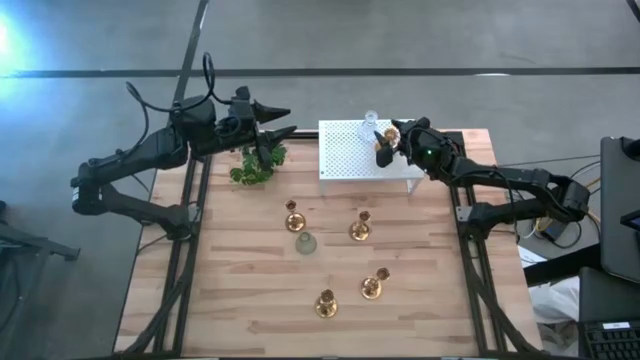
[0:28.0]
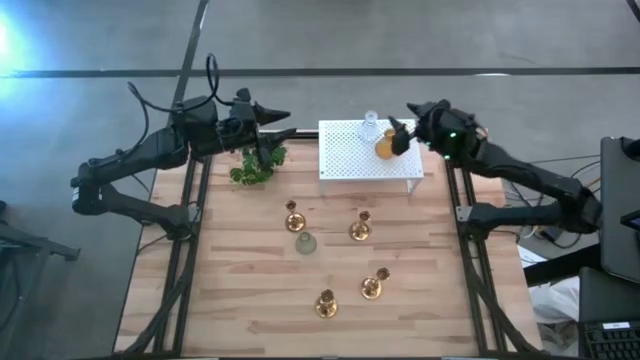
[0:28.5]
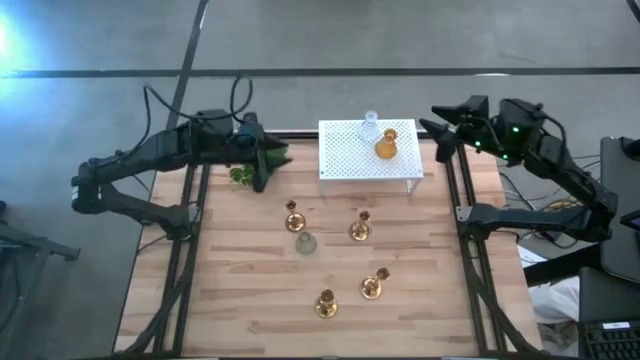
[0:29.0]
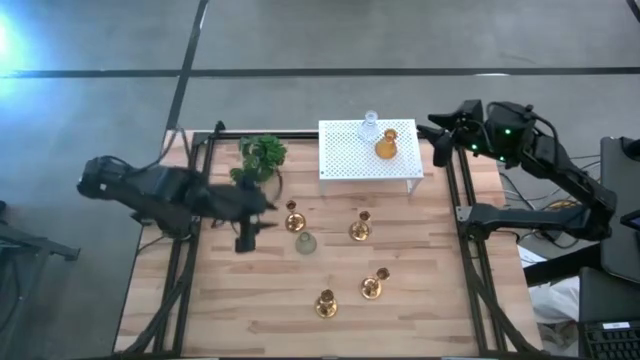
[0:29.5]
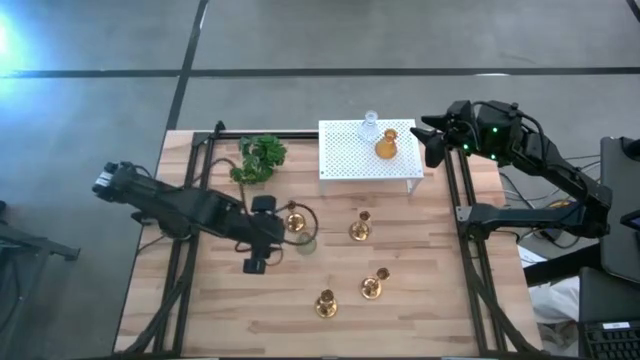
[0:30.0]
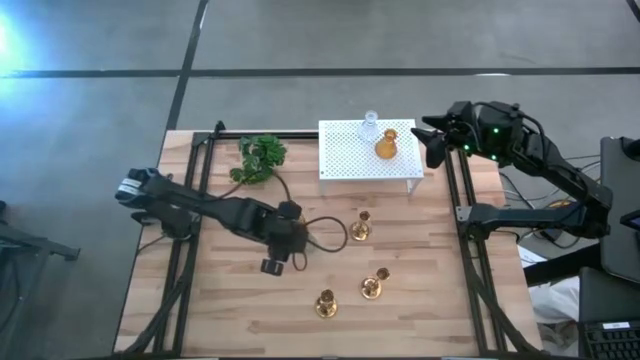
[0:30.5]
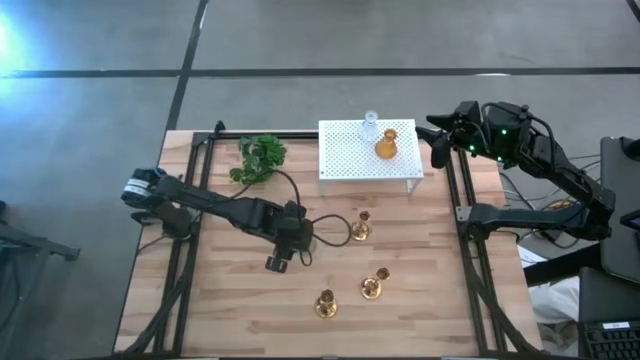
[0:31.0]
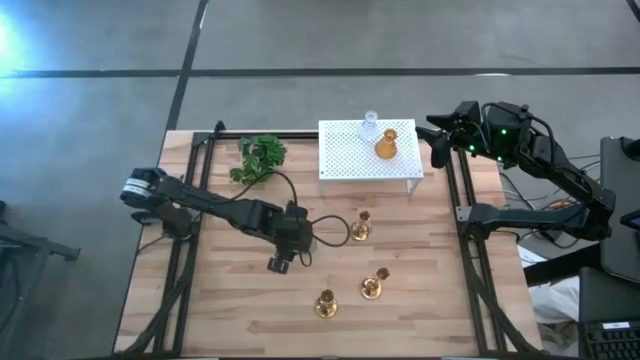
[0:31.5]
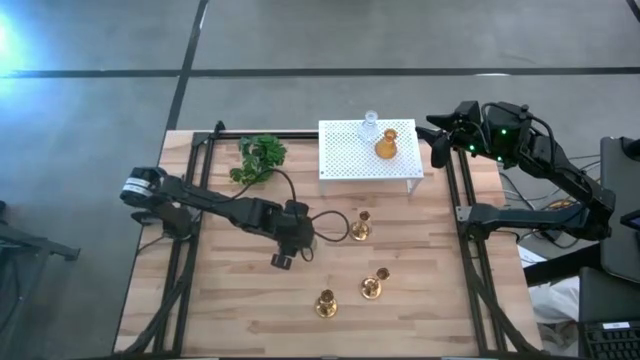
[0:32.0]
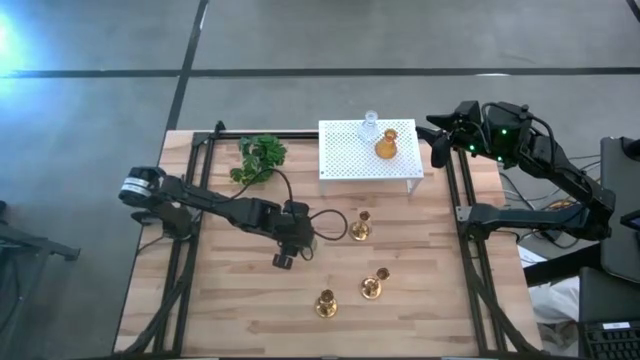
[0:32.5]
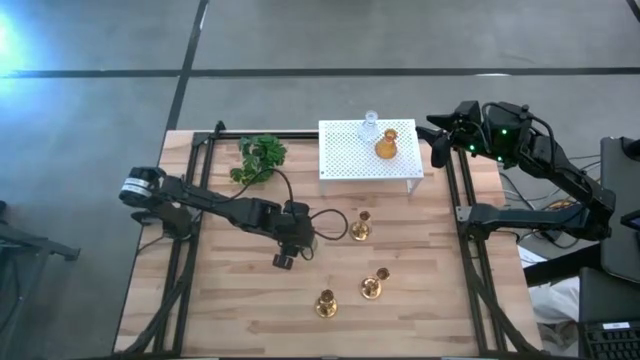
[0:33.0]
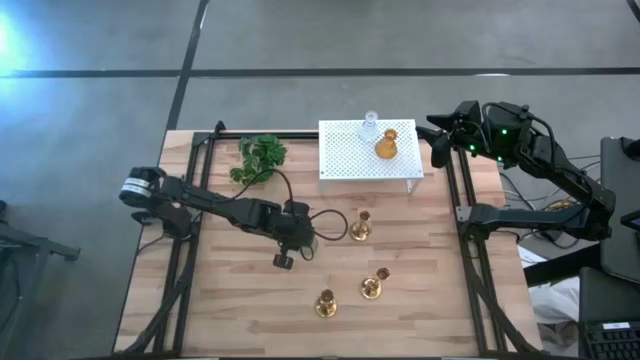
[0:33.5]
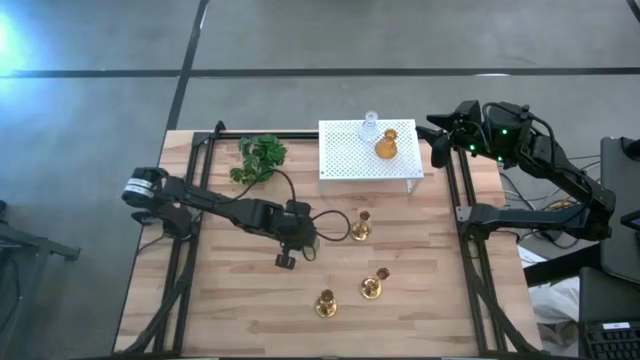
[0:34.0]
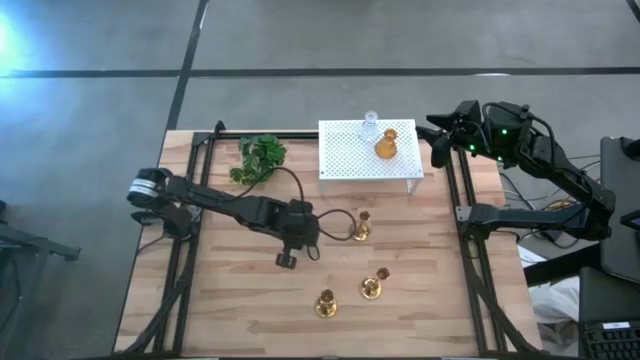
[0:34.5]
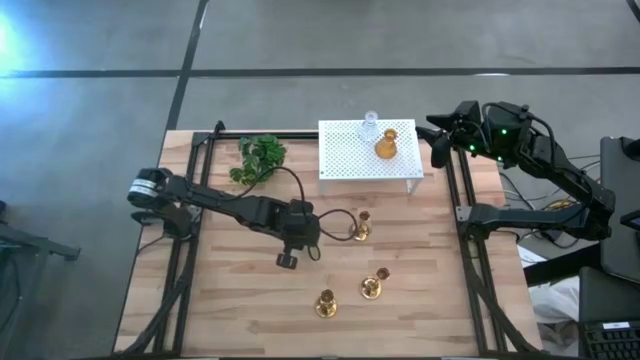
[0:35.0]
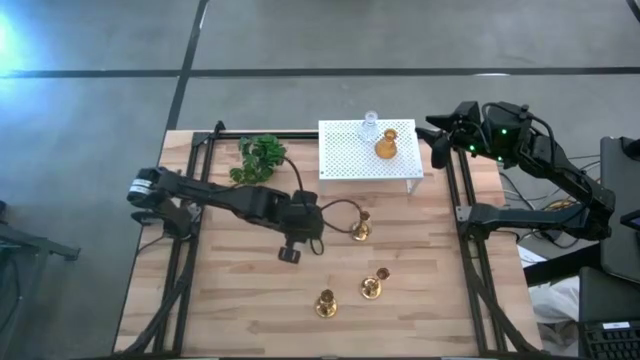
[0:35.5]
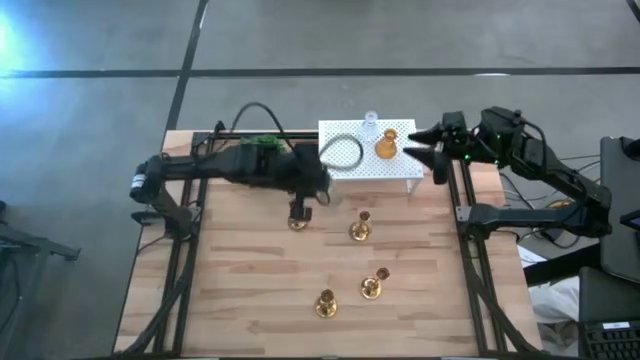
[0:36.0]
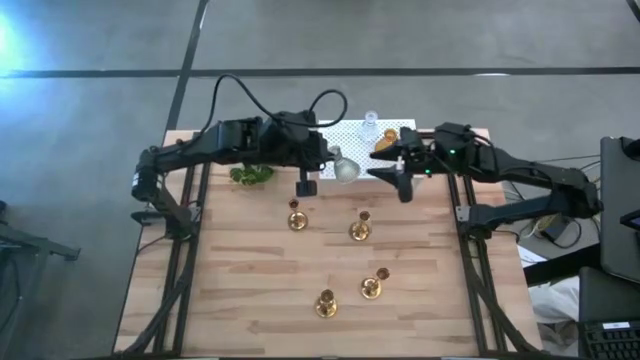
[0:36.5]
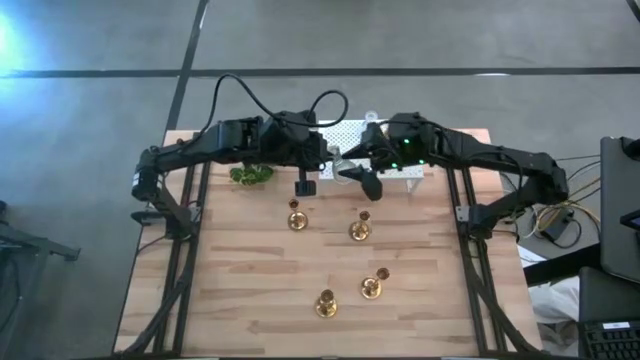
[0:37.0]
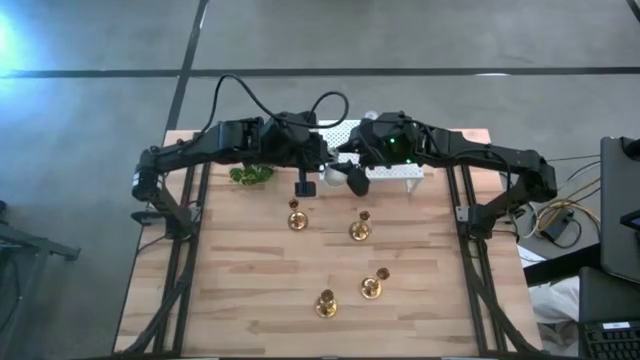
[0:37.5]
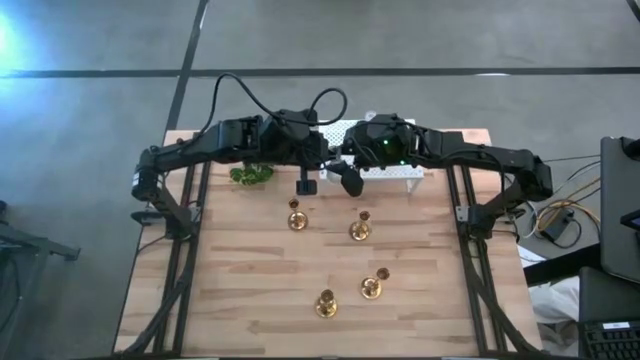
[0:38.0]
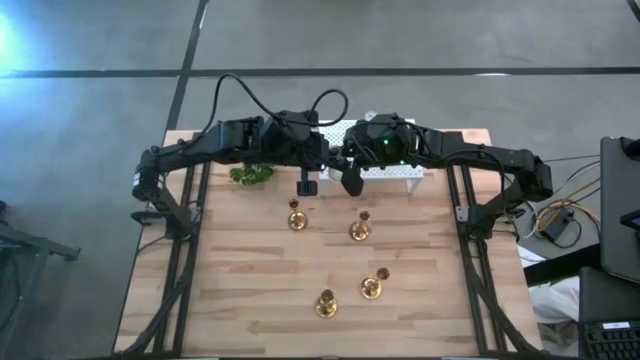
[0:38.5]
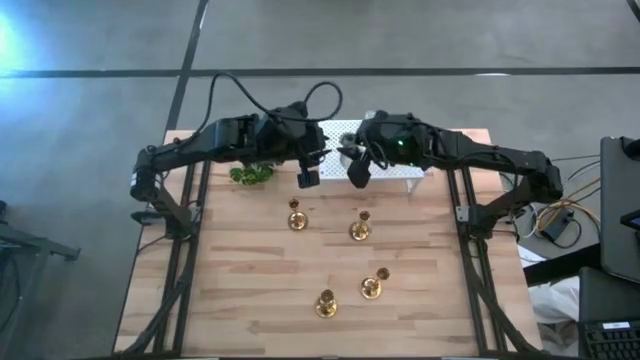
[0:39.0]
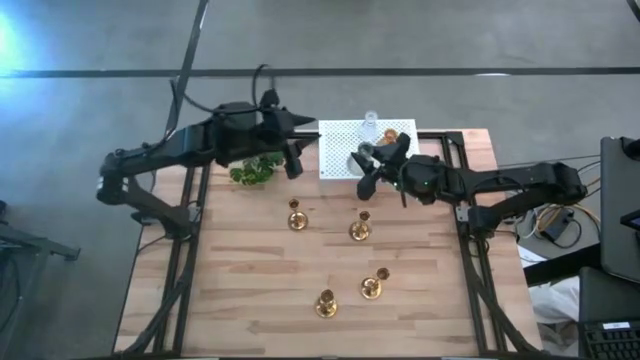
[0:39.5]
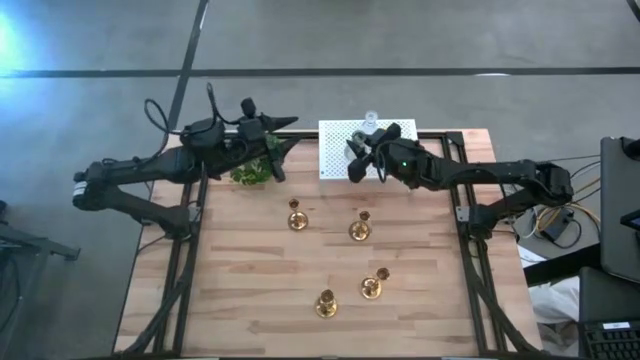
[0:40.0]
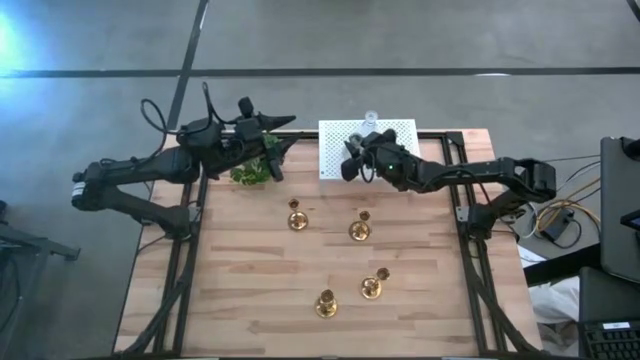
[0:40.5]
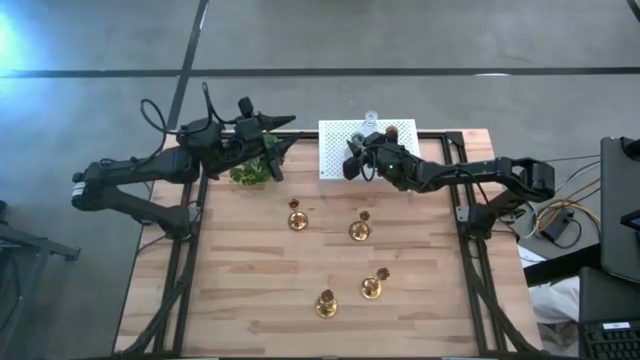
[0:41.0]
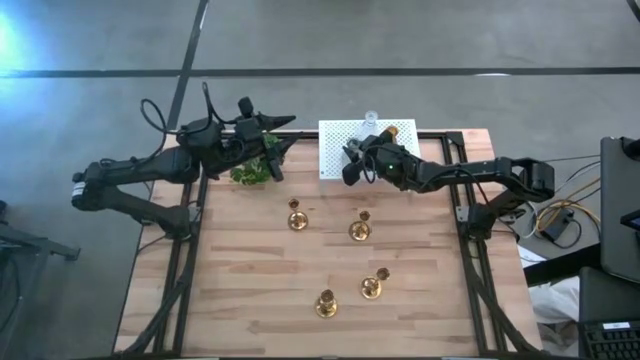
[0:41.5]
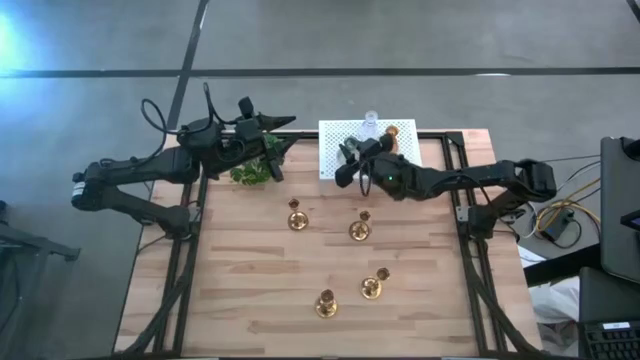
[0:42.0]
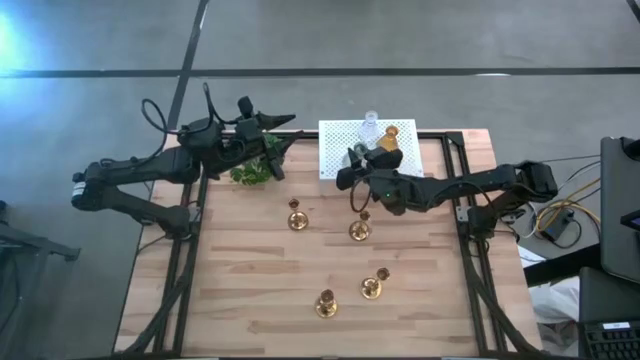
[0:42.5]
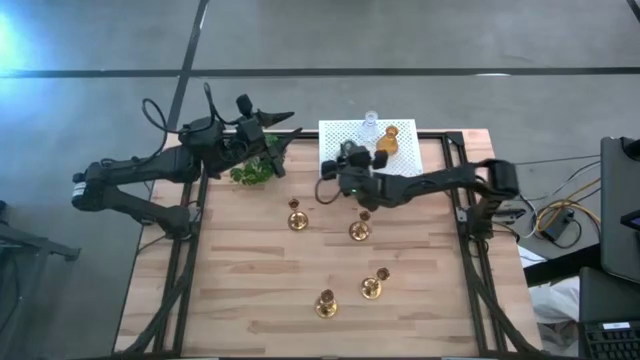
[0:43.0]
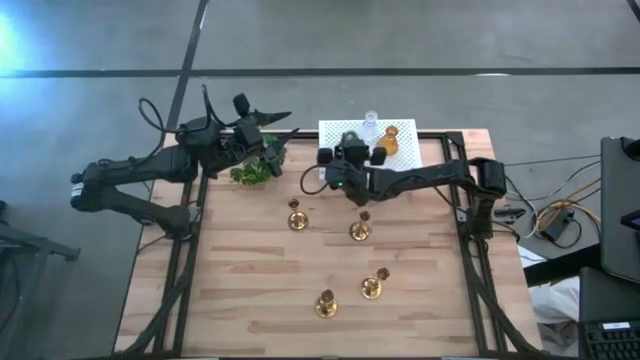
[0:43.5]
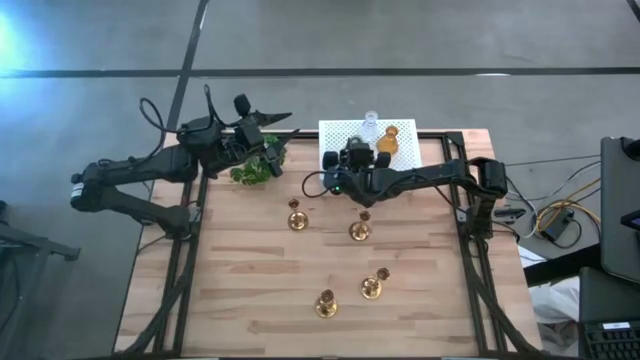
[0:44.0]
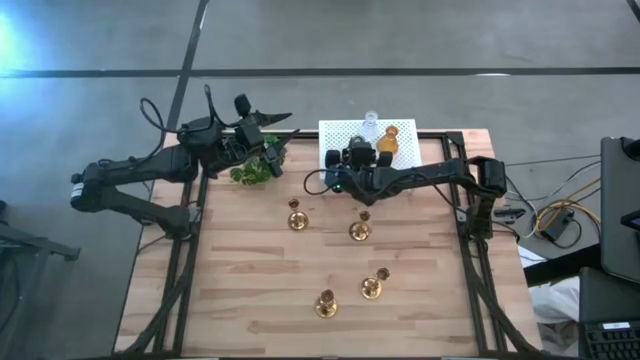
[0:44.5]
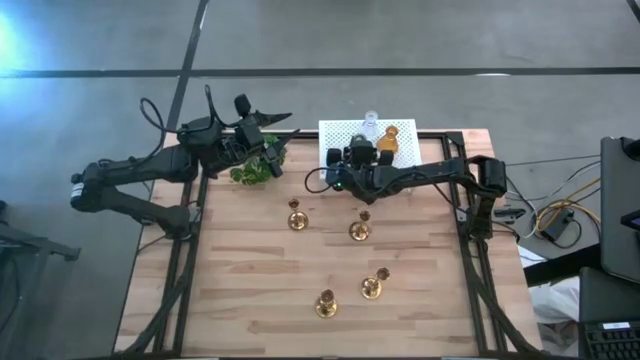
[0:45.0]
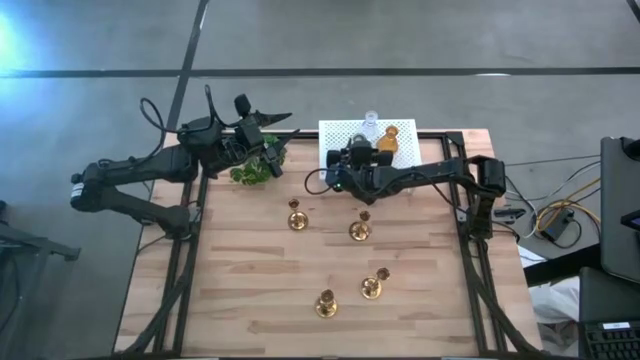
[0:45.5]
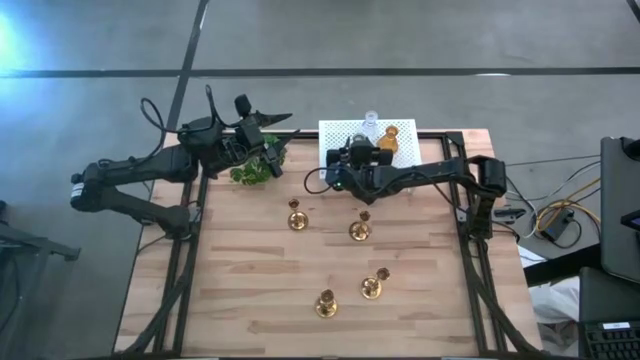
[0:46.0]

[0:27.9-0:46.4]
Task: Pick & Place candle stick holders
Put the green glass candle holder on the shelf

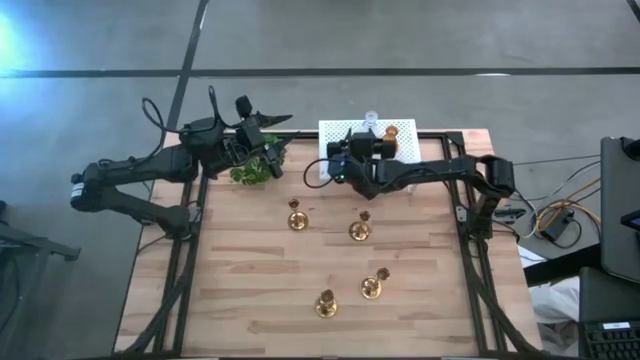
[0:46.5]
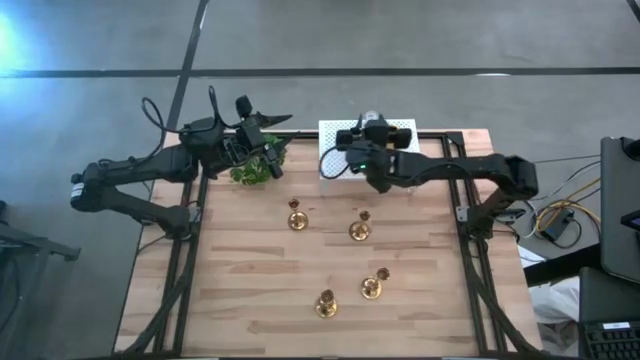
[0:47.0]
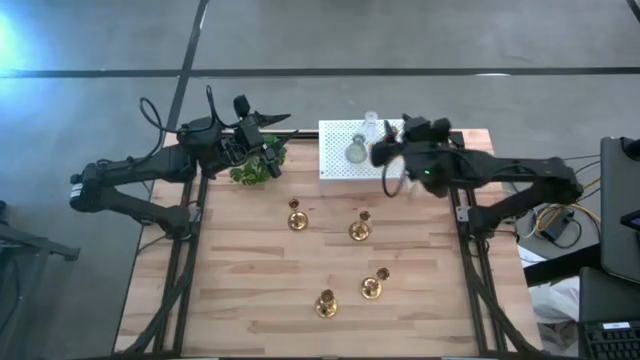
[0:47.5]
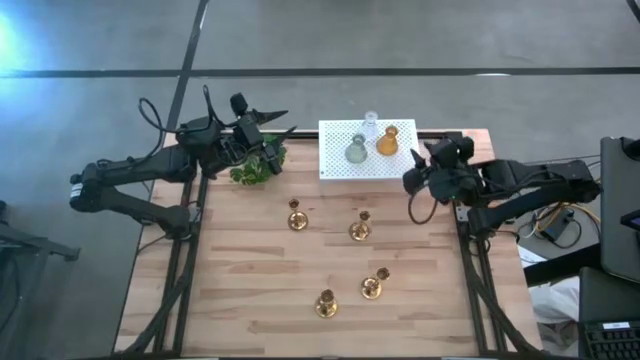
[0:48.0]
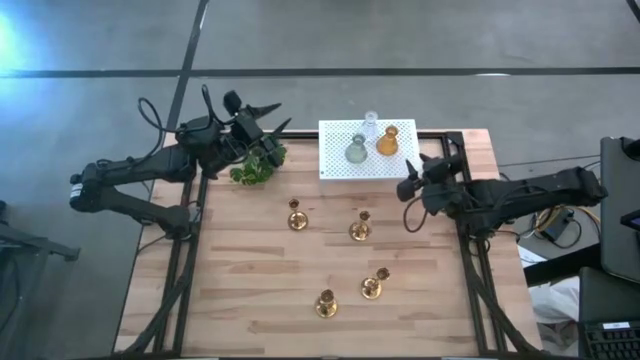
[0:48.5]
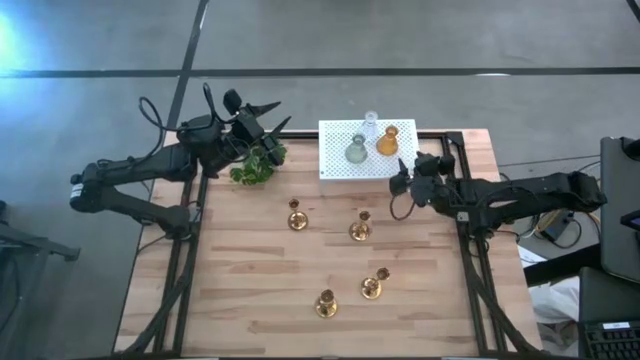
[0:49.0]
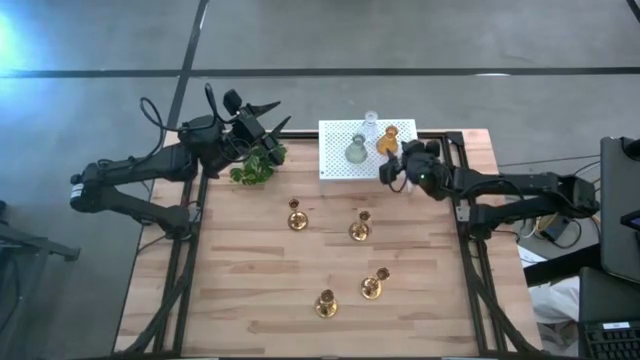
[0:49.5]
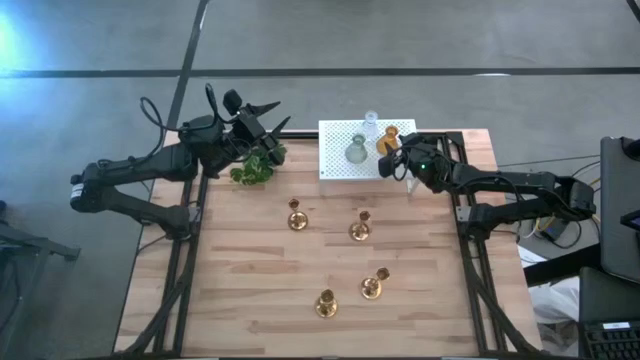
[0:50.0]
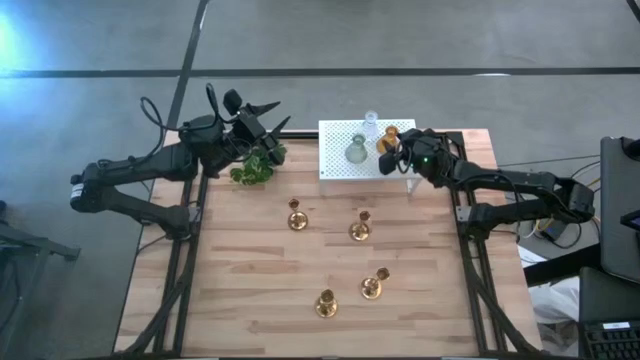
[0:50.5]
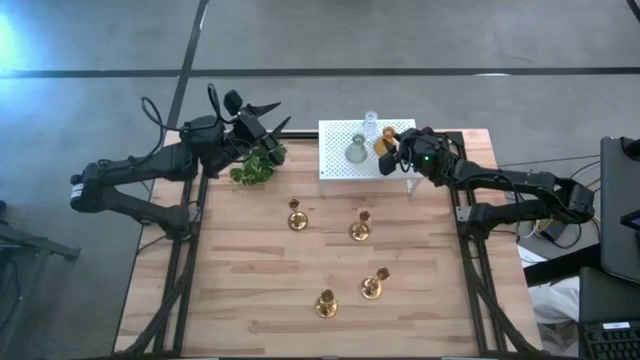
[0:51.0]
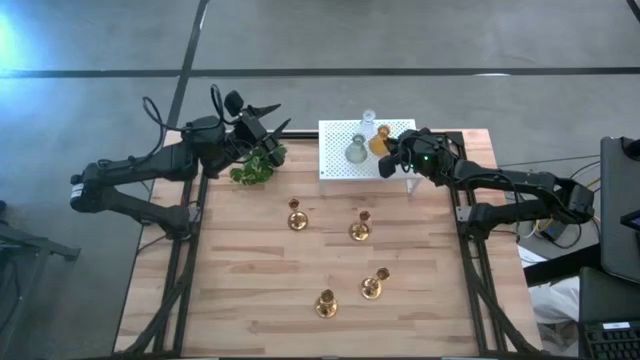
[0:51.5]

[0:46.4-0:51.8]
Adjust the yellow glass candle holder
